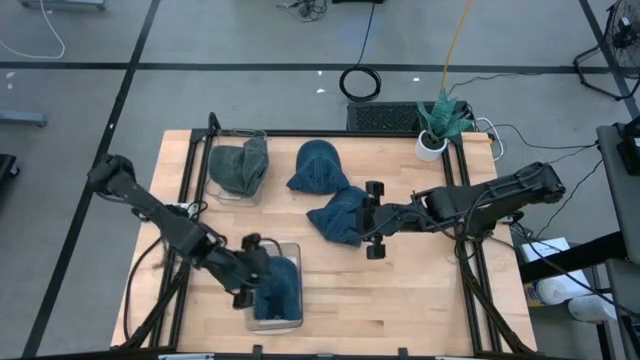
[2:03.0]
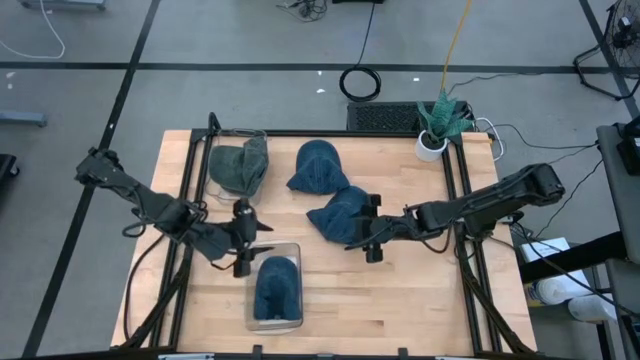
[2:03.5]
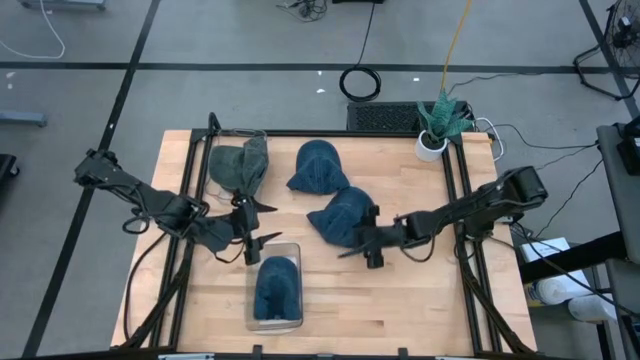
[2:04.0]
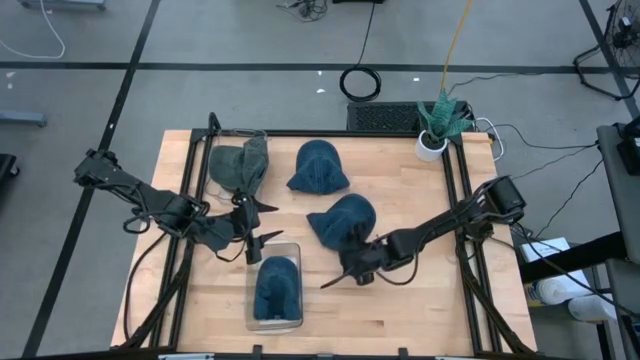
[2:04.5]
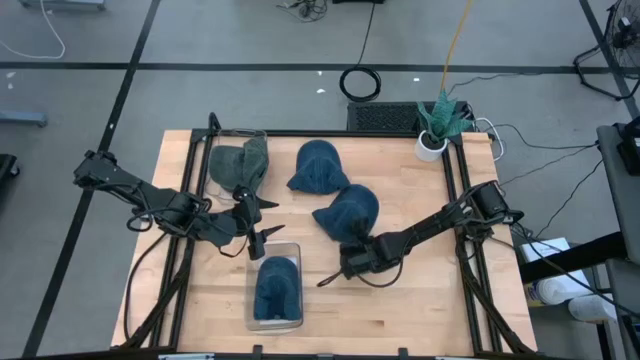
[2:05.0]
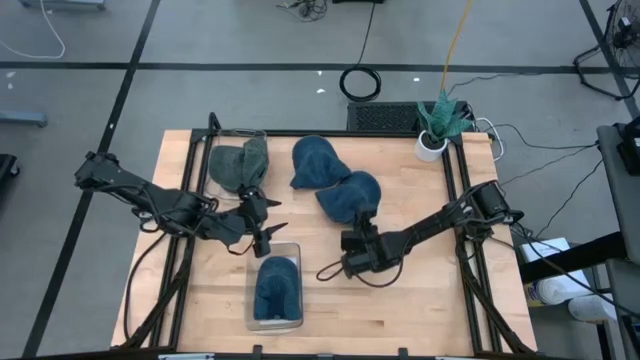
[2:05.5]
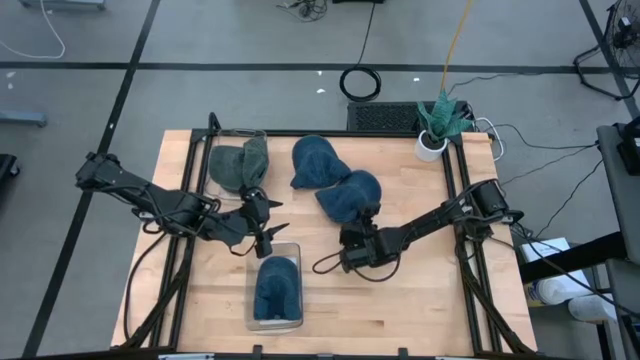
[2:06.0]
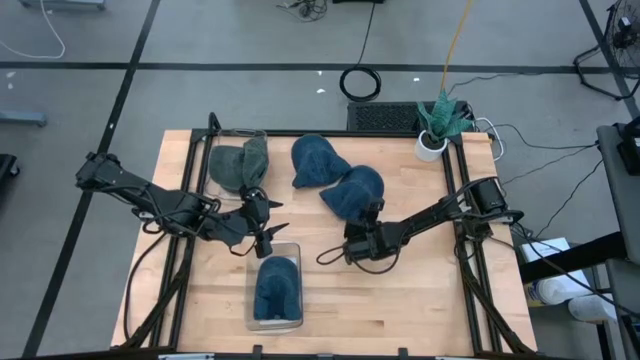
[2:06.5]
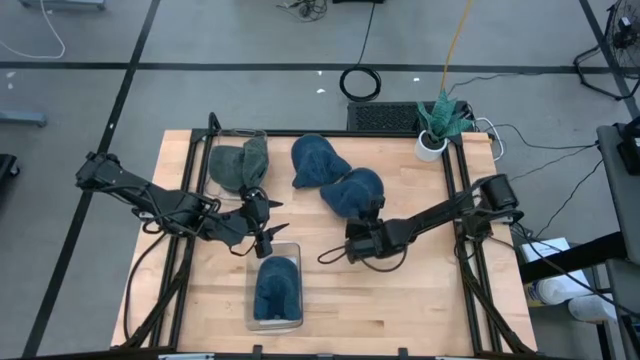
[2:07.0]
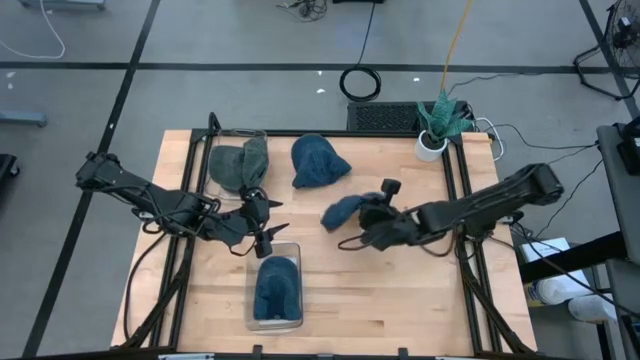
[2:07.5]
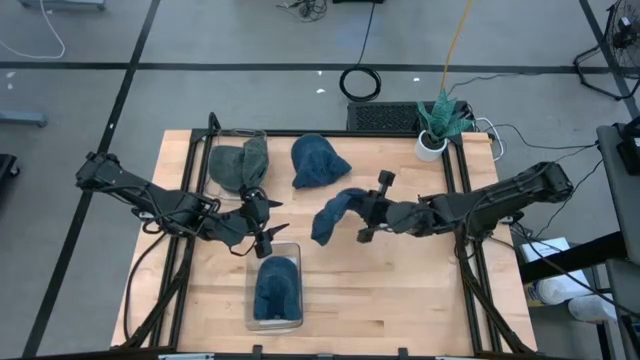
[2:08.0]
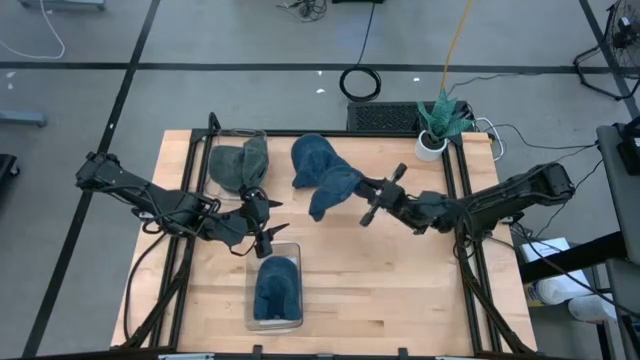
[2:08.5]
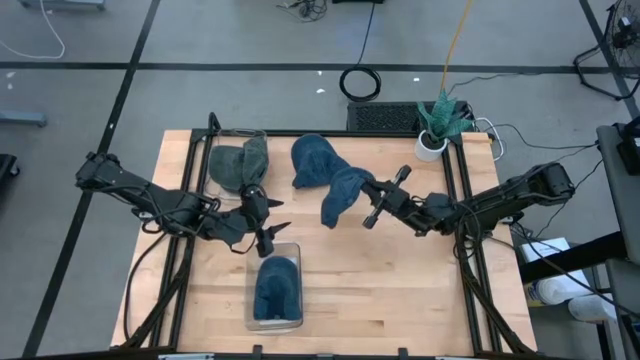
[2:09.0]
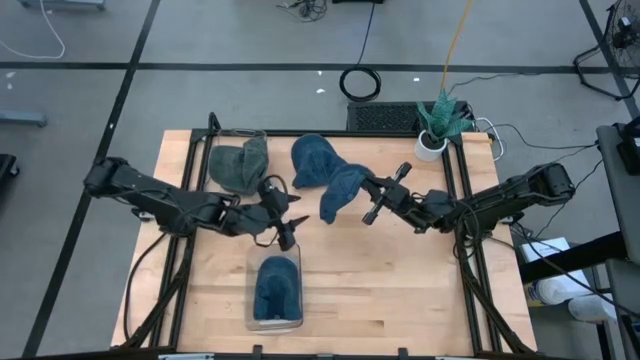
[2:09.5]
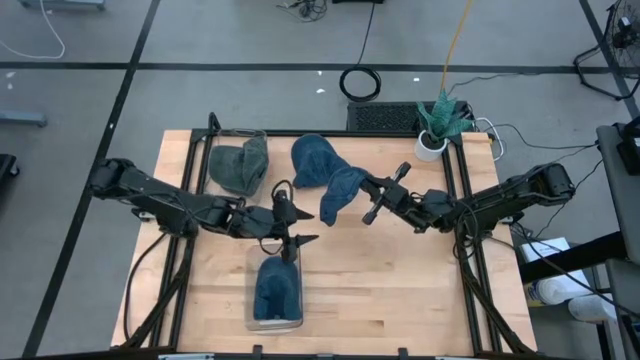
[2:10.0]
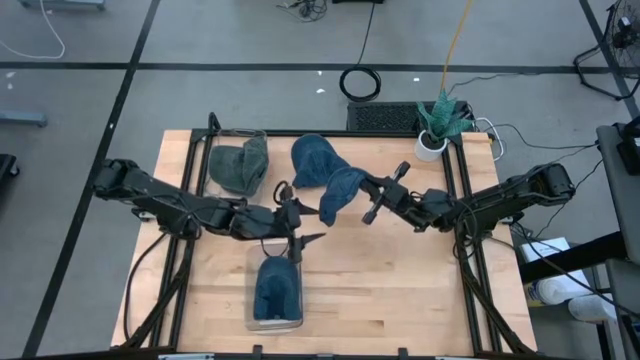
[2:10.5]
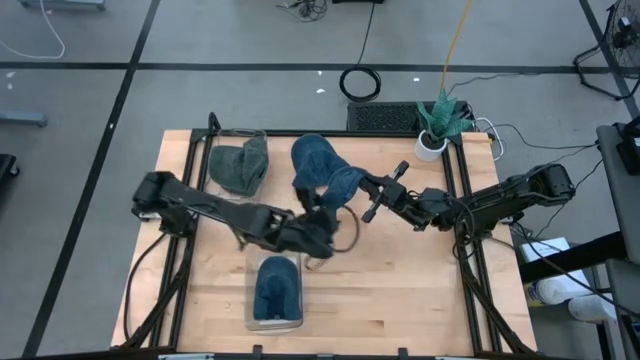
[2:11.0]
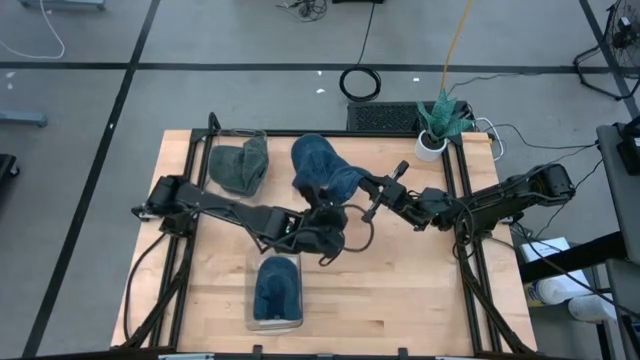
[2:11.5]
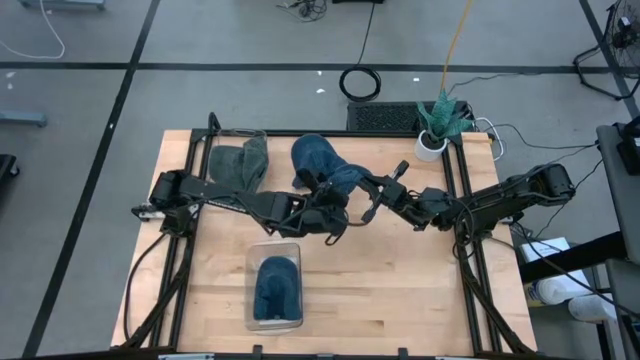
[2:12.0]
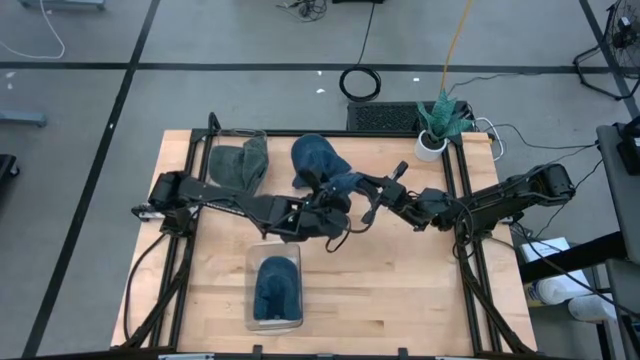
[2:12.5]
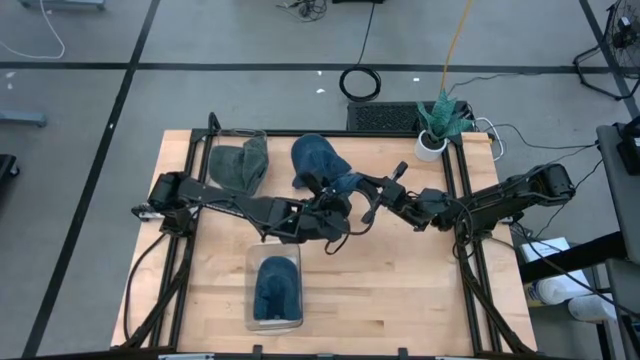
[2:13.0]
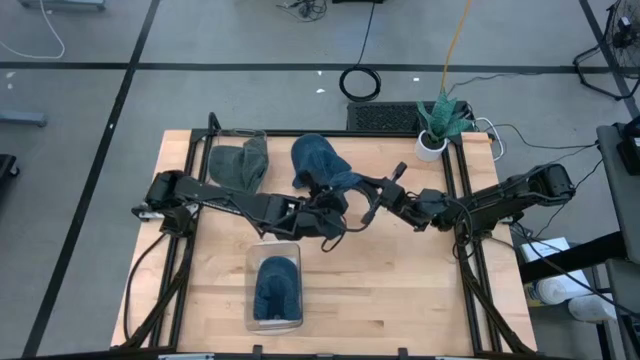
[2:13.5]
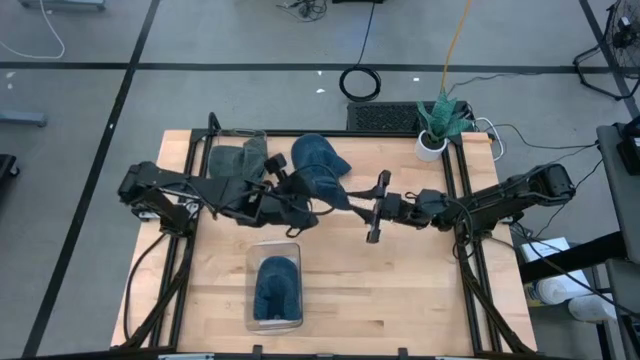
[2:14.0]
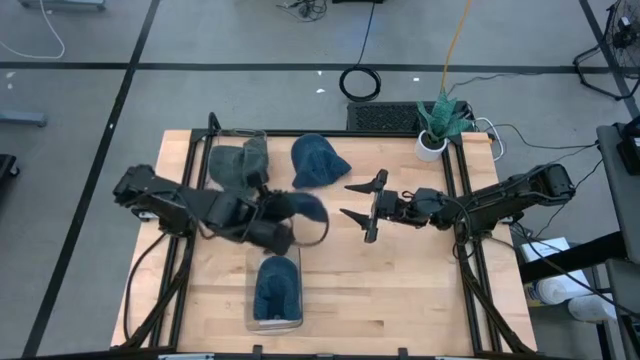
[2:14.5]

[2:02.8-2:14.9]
Task: Pick & Place hat
Put the bottom blue cap into the bottom transparent bin

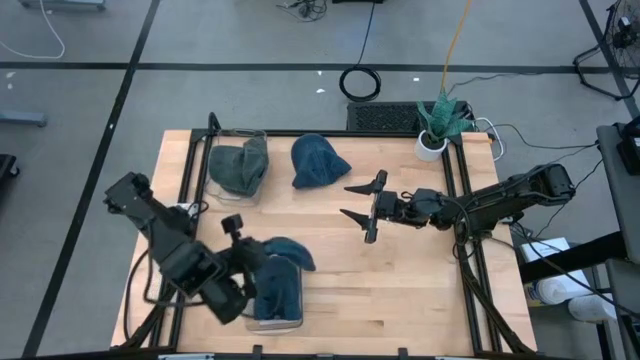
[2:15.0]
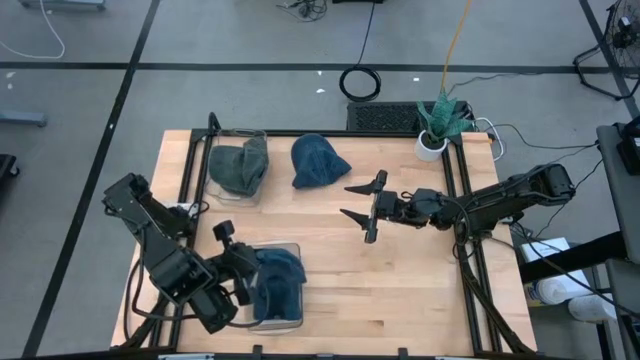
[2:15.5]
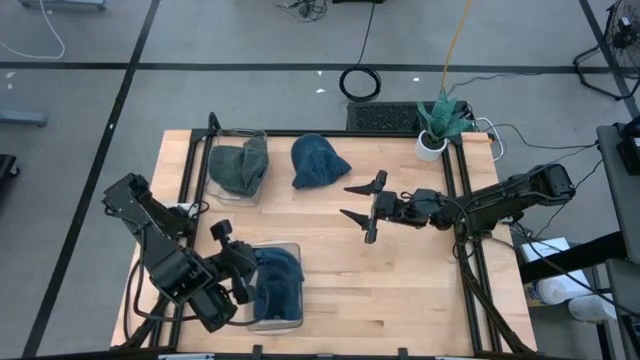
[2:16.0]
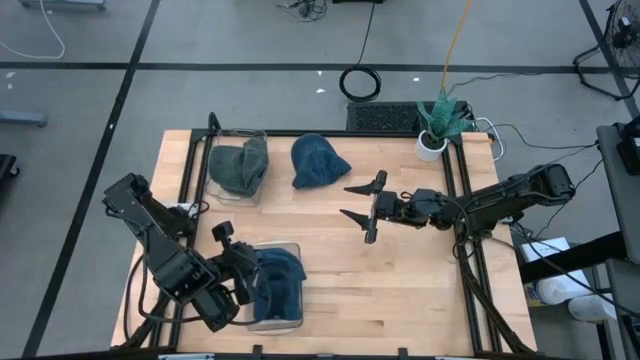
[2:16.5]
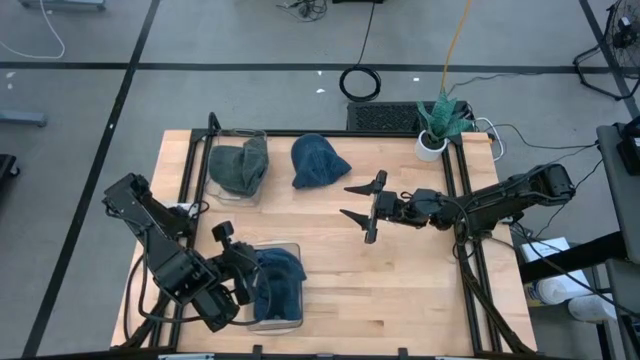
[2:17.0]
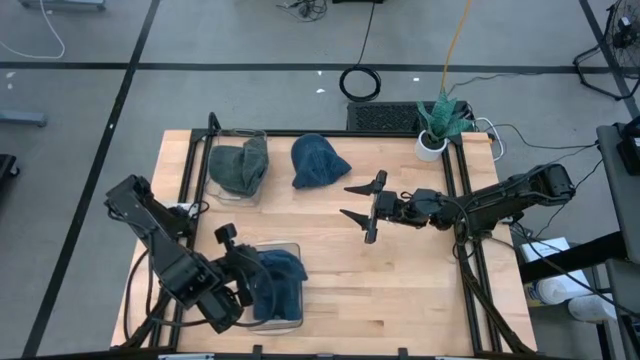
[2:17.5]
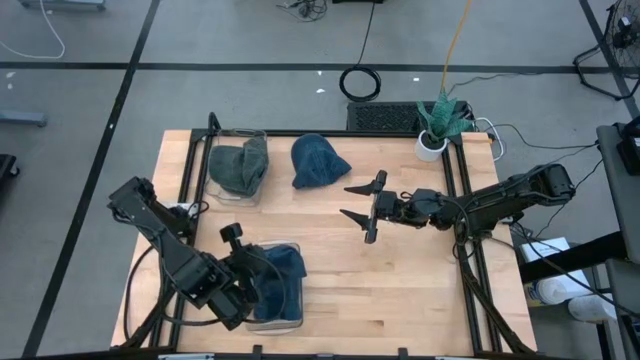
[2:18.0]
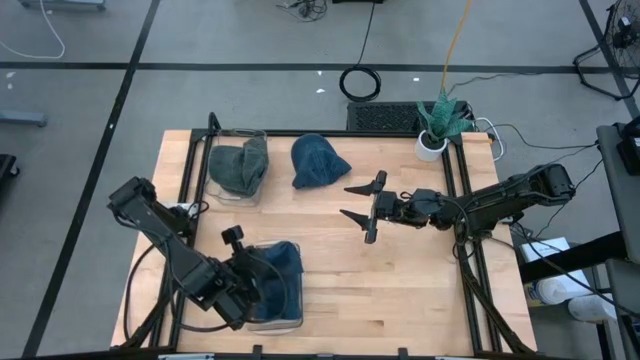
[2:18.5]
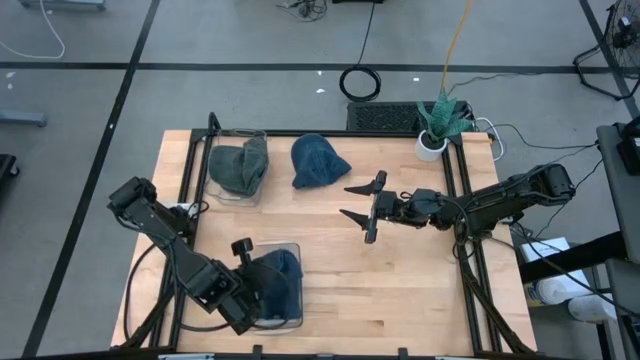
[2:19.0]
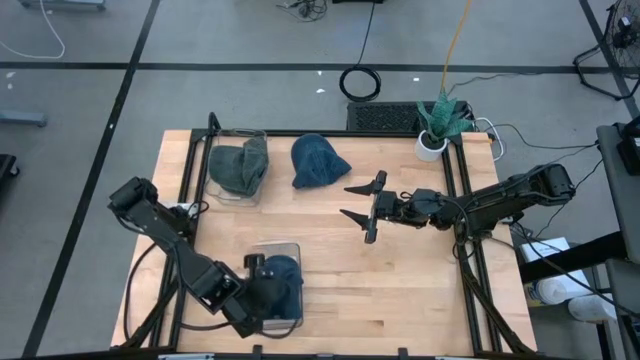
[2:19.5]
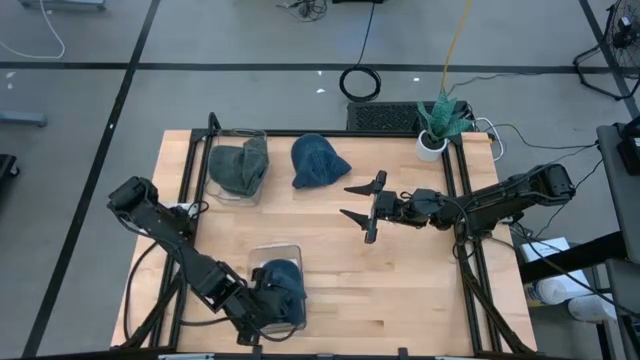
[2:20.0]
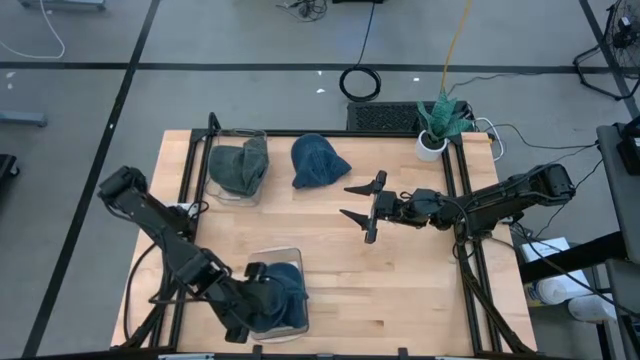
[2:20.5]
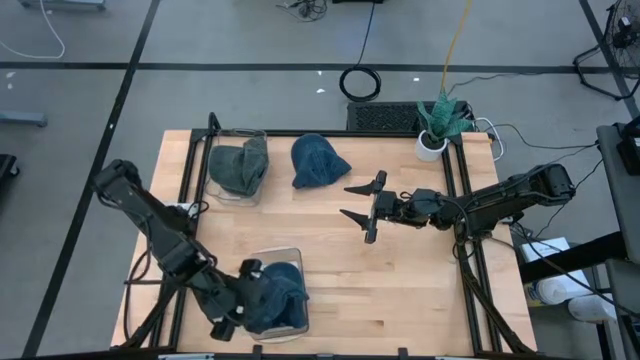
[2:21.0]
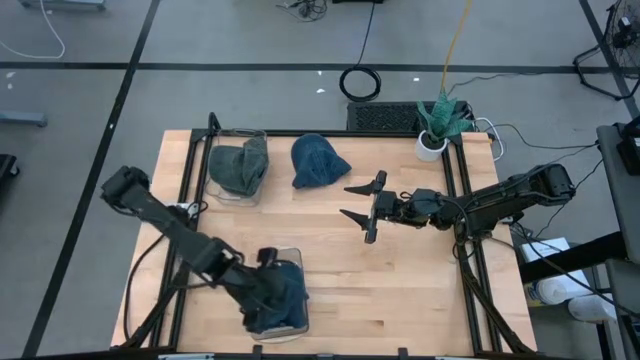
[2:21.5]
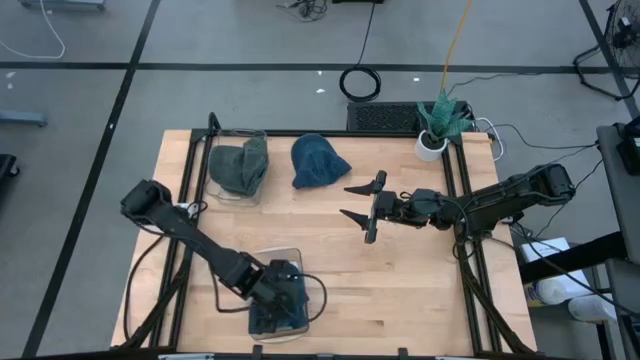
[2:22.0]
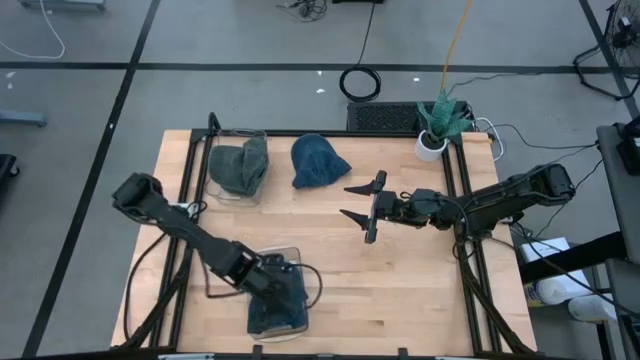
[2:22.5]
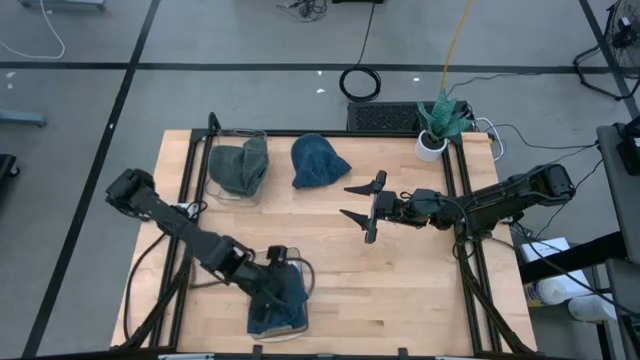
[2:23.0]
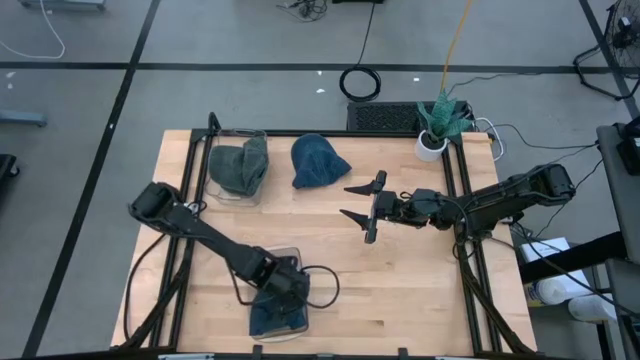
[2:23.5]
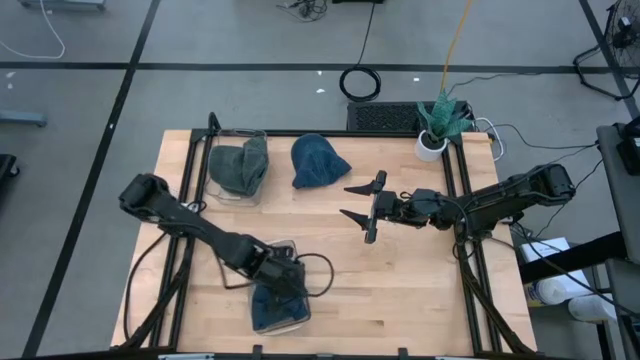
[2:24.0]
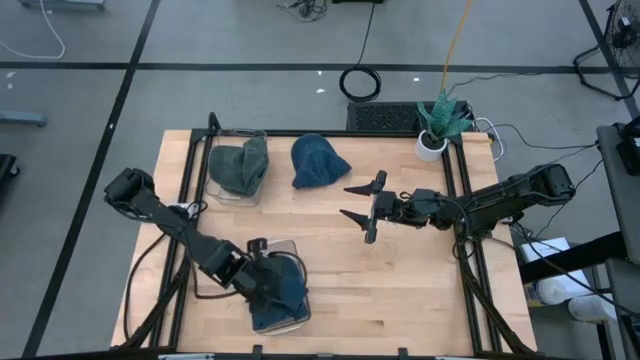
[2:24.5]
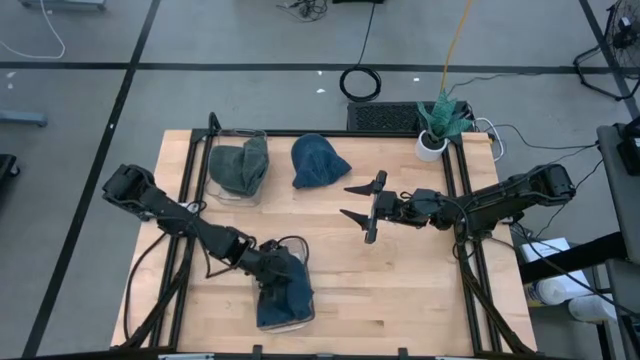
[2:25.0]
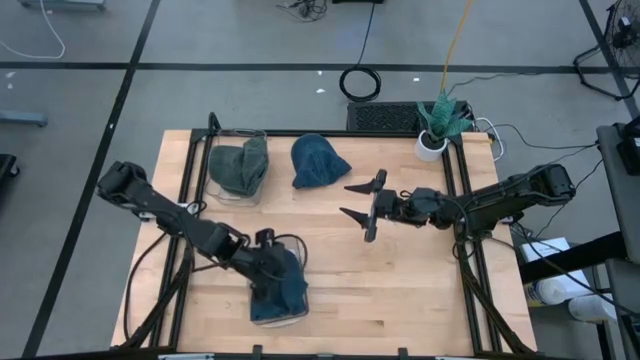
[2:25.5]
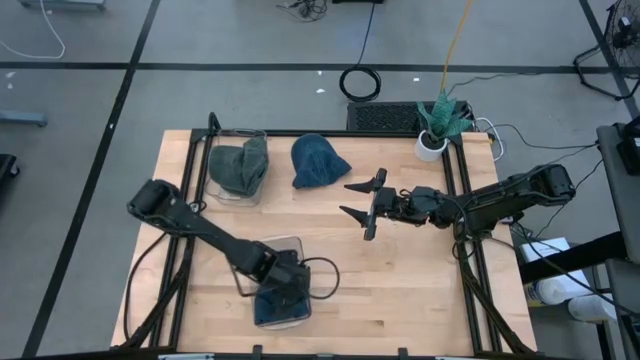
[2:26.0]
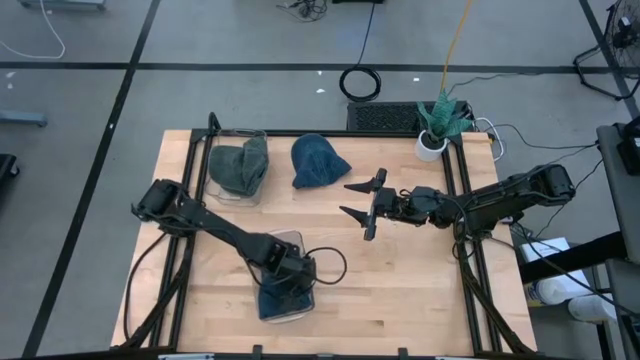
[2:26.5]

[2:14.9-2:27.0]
Put the bottom blue cap into the bottom transparent bin
